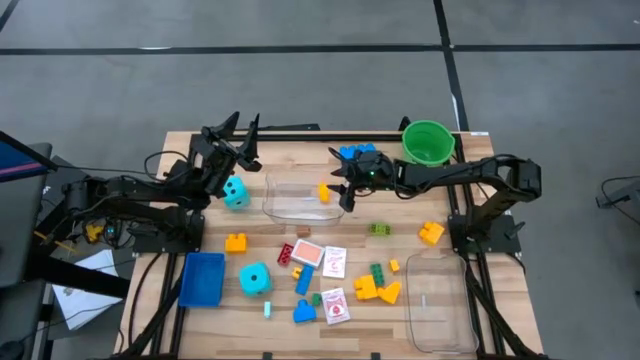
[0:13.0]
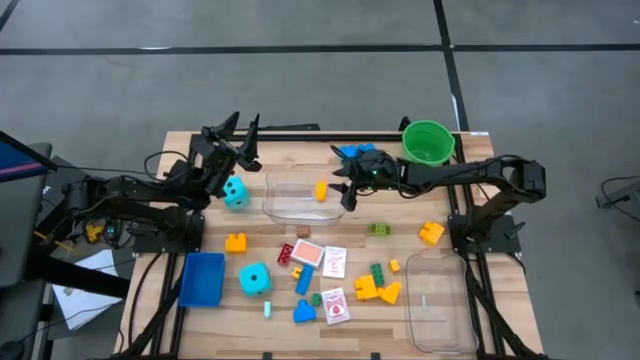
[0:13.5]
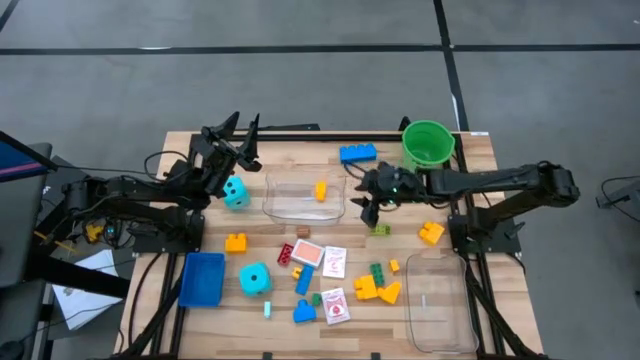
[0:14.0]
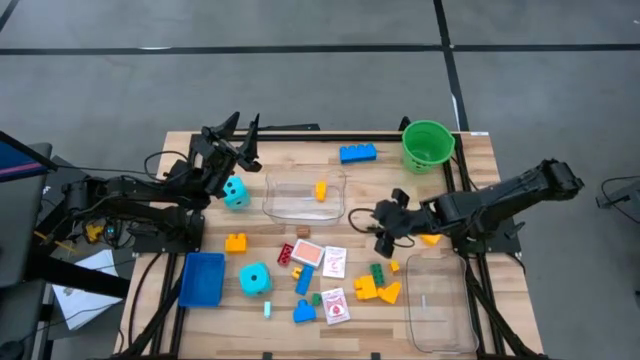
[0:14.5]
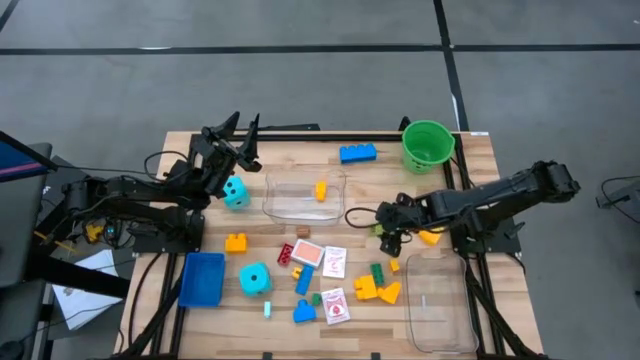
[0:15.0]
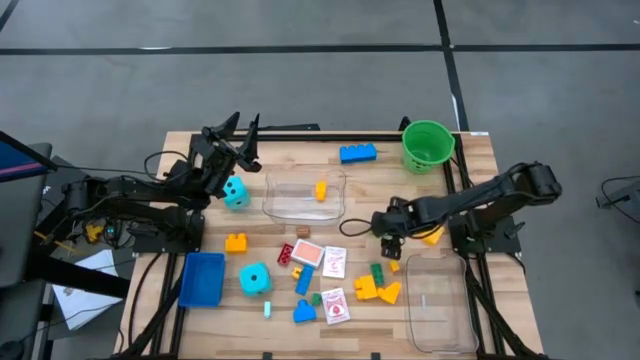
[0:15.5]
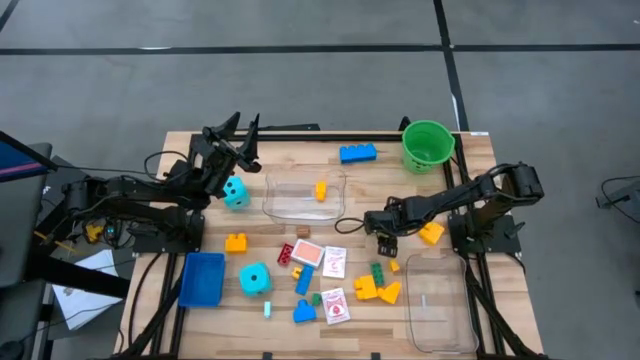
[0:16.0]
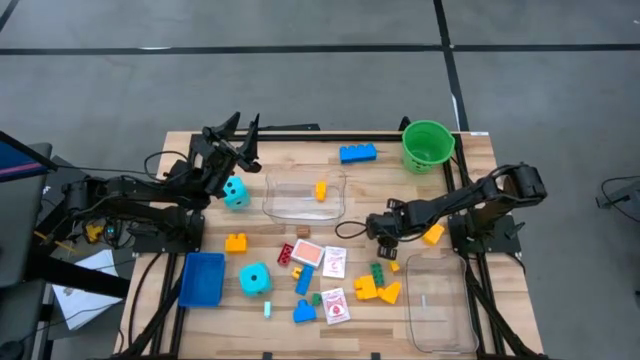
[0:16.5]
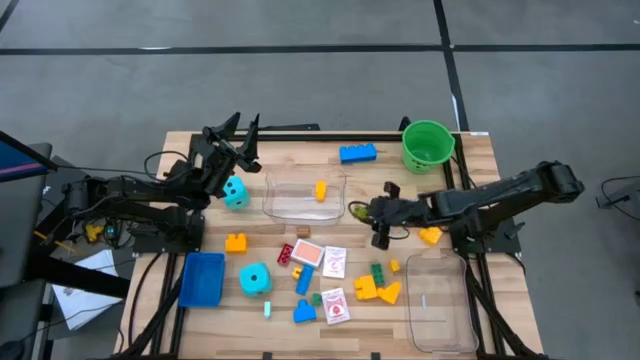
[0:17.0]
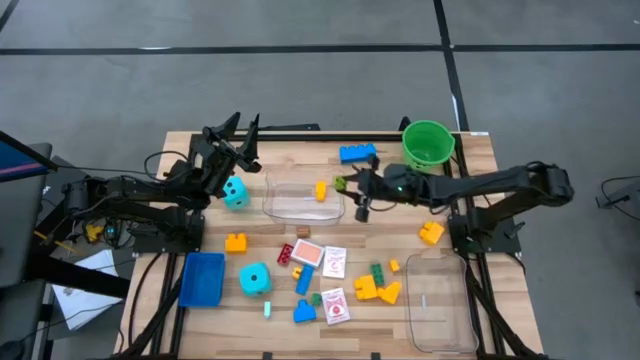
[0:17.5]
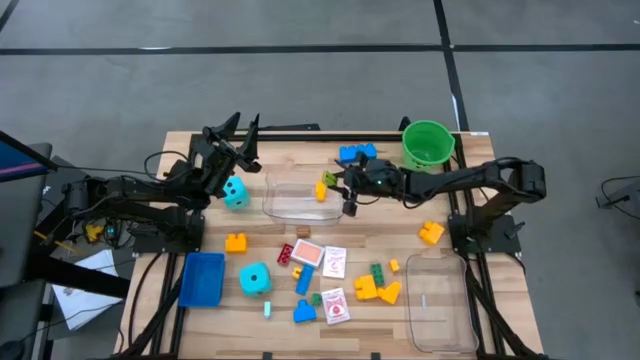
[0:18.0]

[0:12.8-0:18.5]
Task: Pick & Place Toys
Put the light green game piece into the top transparent bin

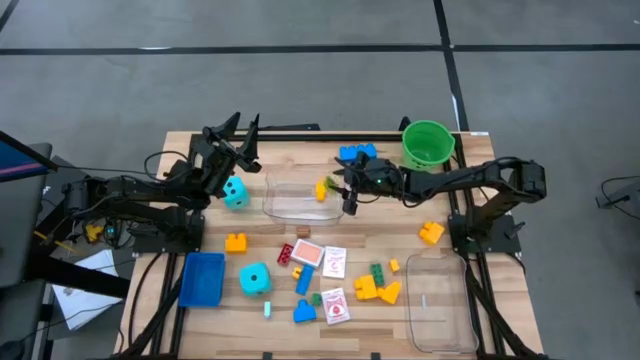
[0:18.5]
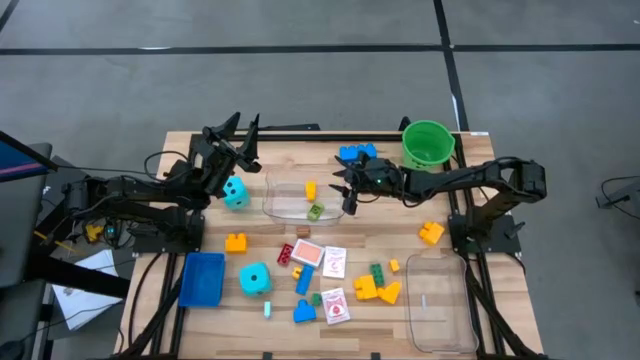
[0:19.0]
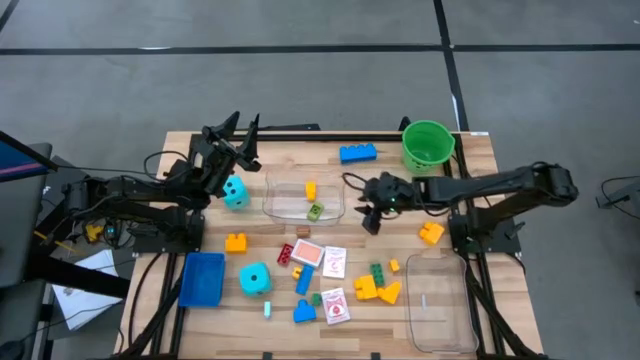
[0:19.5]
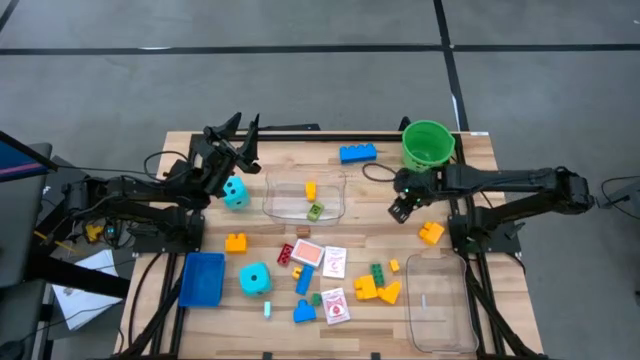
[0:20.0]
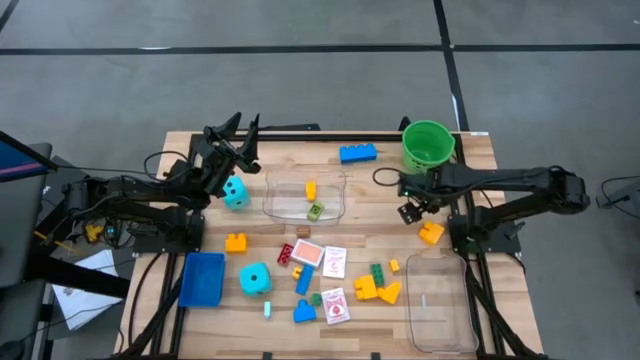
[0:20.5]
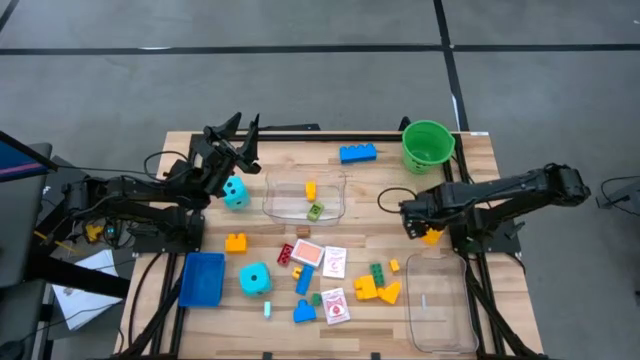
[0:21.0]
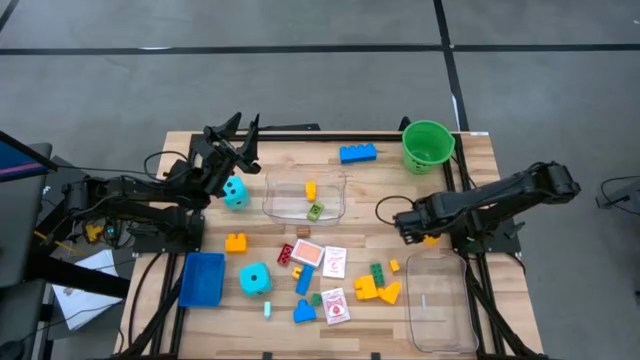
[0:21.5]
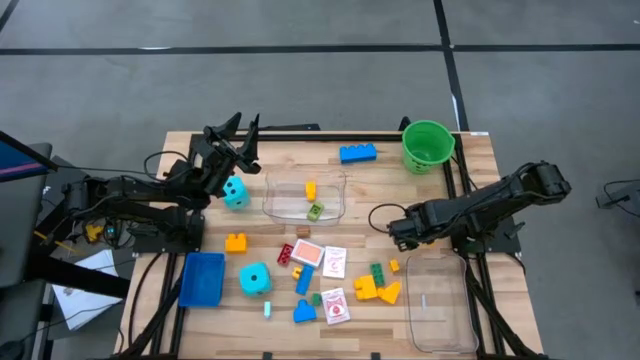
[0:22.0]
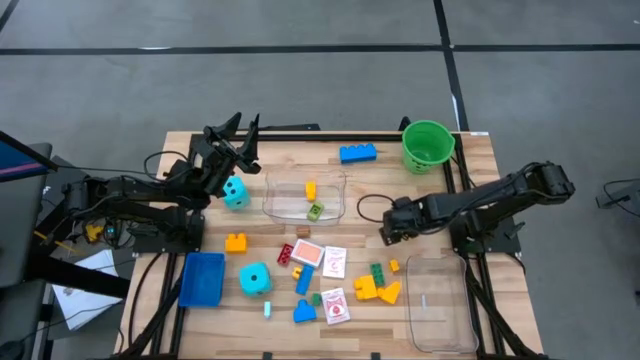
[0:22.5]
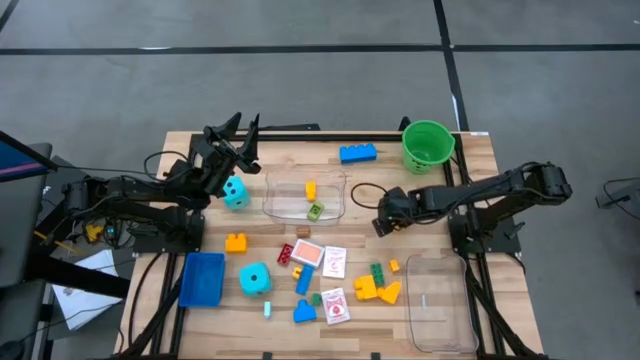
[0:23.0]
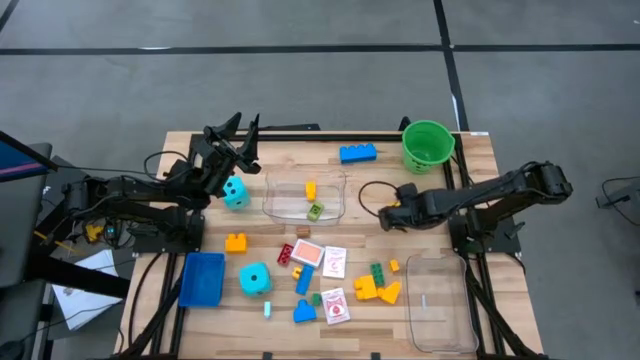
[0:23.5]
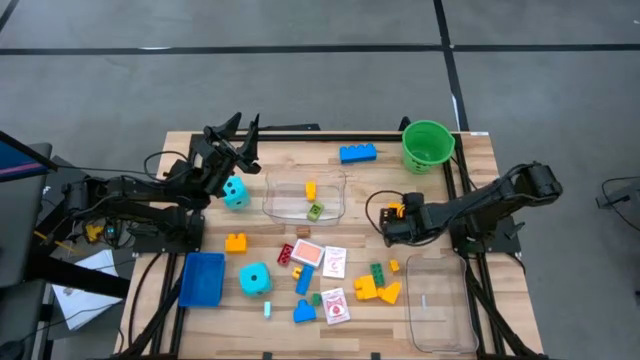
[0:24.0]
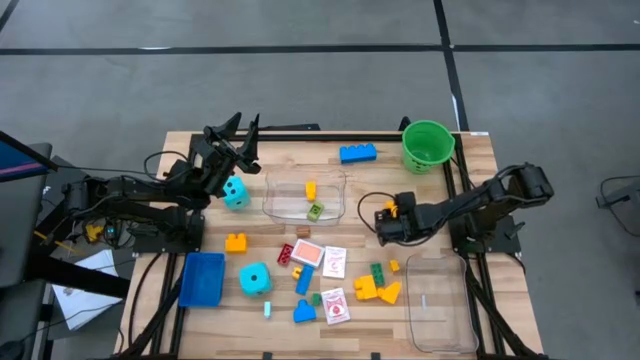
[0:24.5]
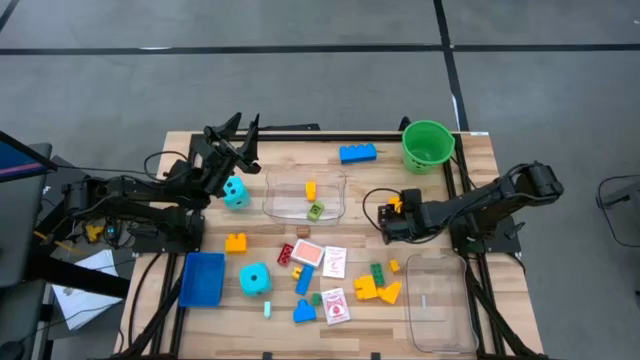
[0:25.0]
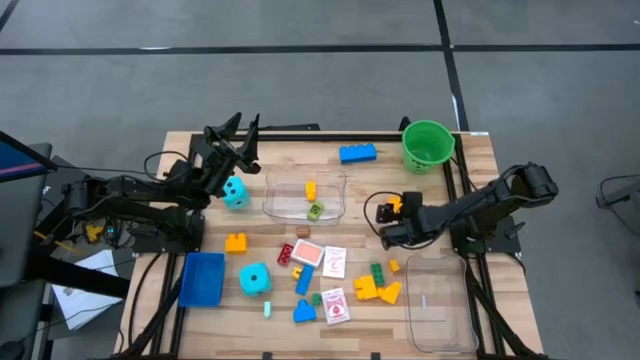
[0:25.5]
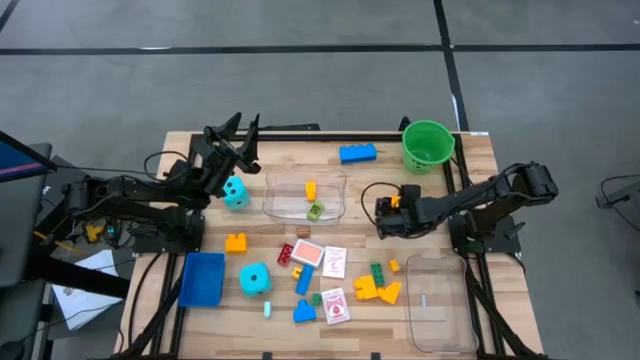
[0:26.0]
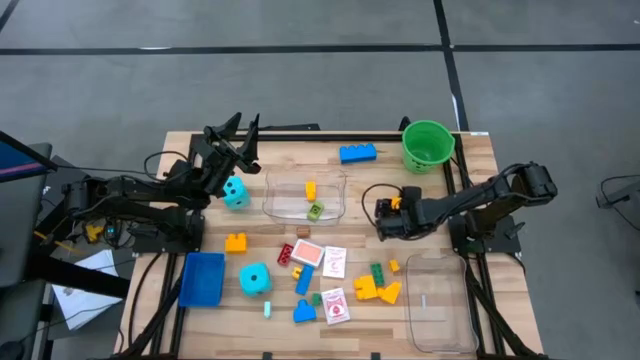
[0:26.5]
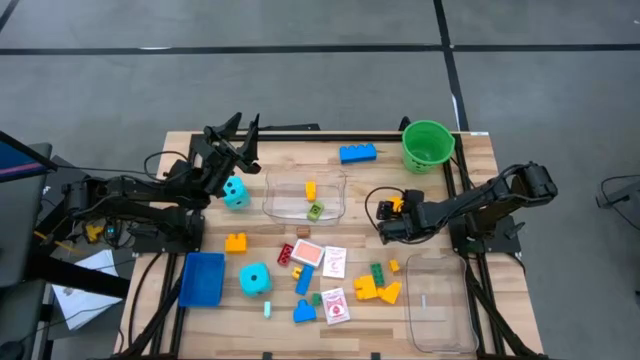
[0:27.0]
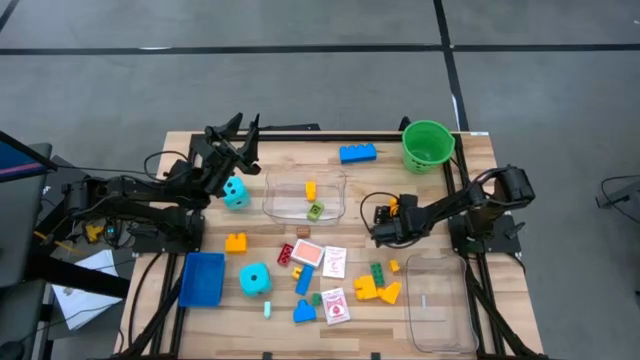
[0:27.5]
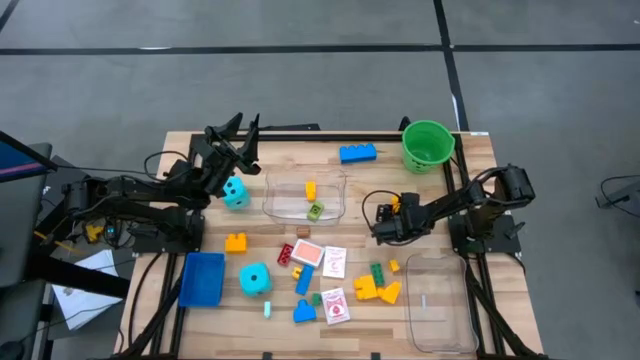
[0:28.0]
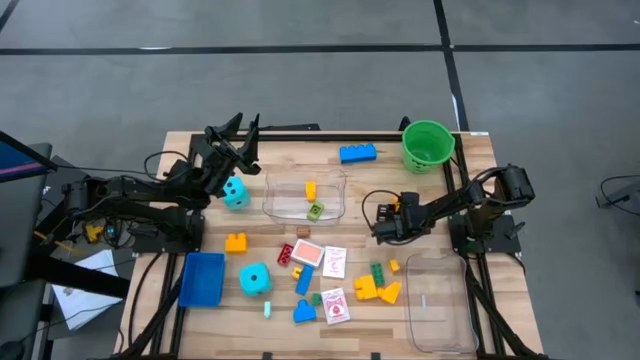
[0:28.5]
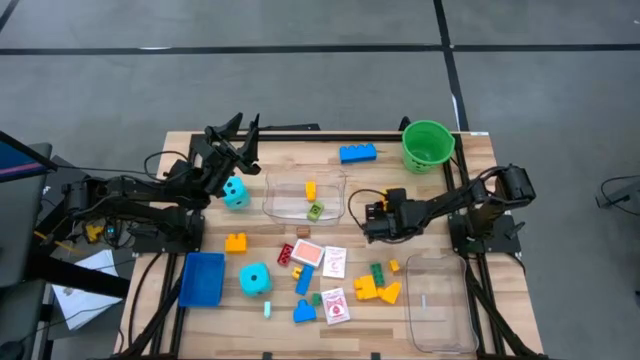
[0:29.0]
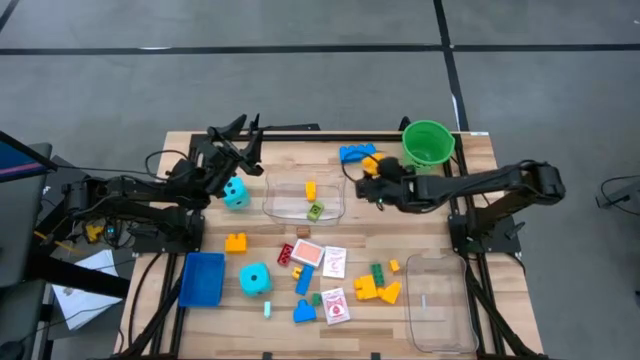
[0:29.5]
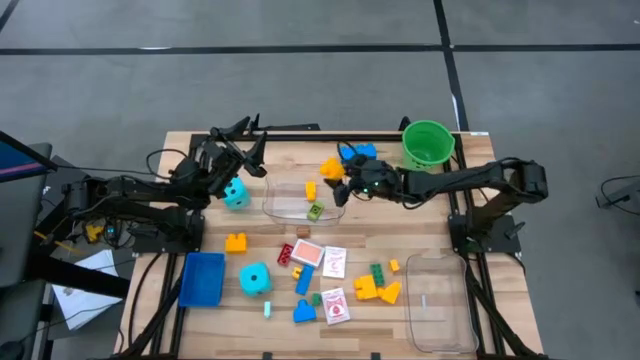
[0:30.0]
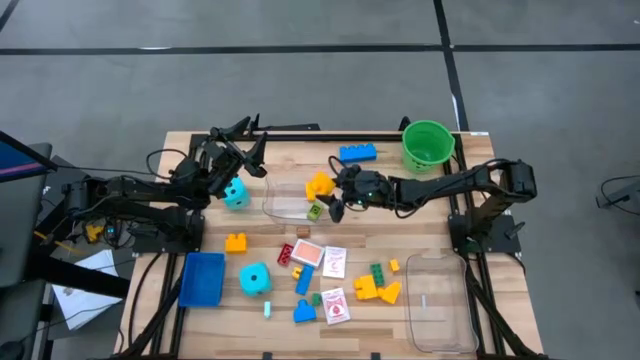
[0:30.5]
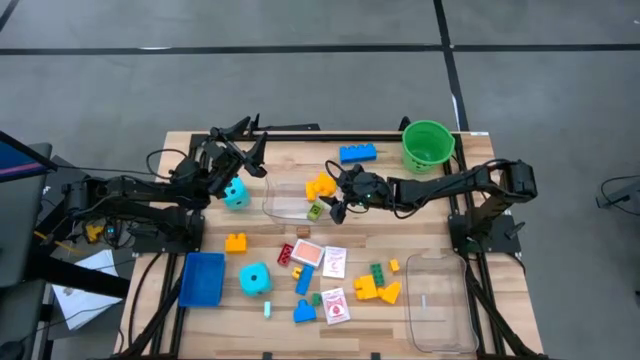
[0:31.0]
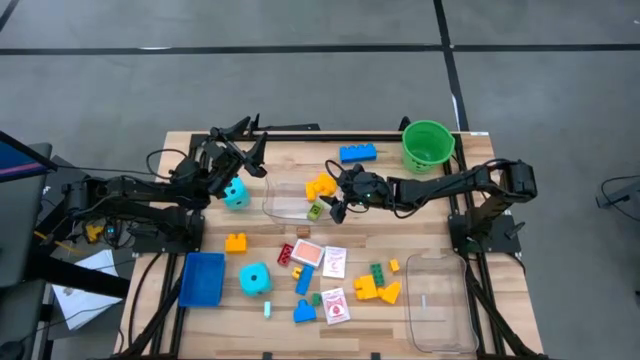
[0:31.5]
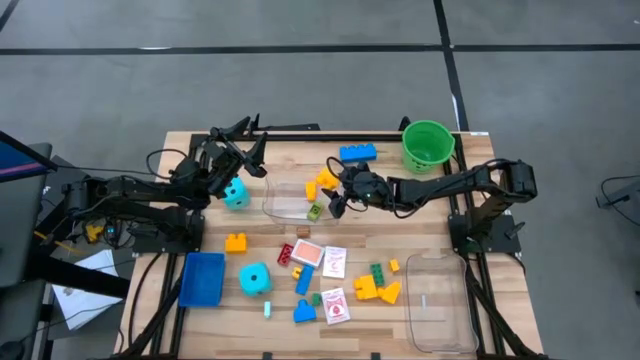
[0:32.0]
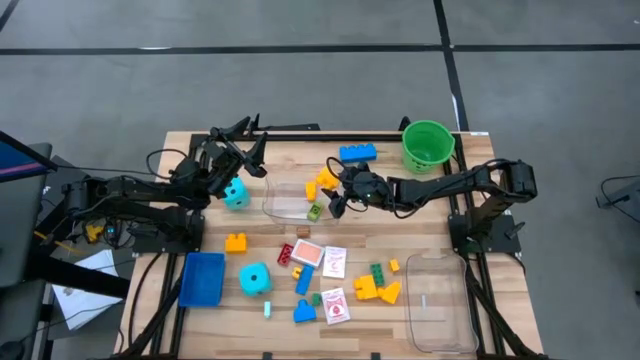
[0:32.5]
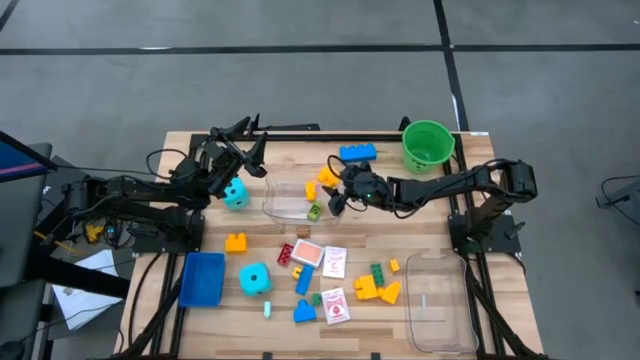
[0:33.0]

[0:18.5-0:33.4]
Put the yellow game piece into the top transparent bin
